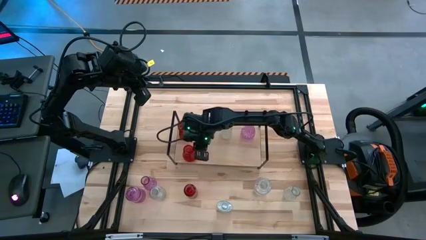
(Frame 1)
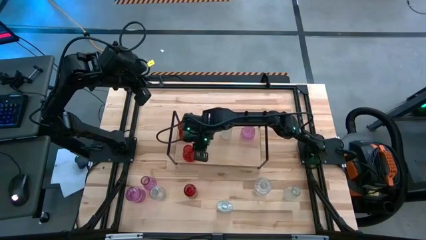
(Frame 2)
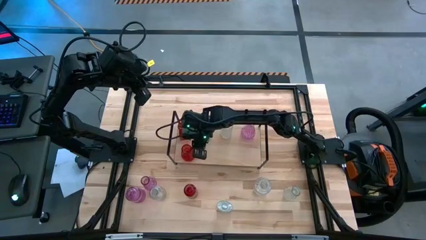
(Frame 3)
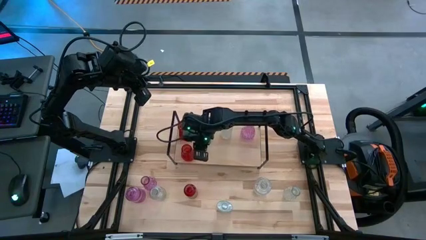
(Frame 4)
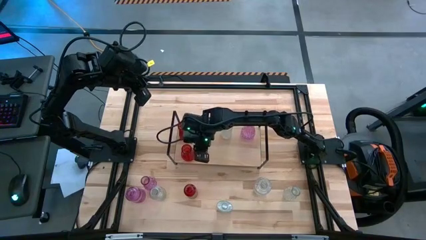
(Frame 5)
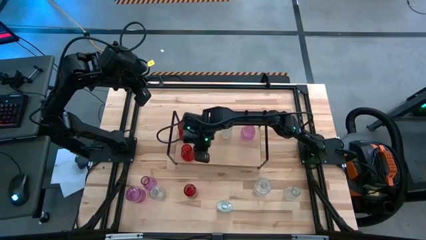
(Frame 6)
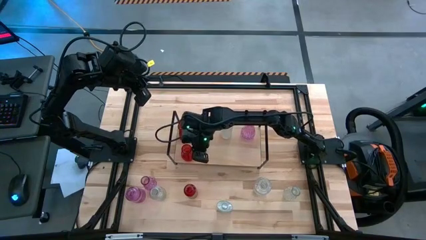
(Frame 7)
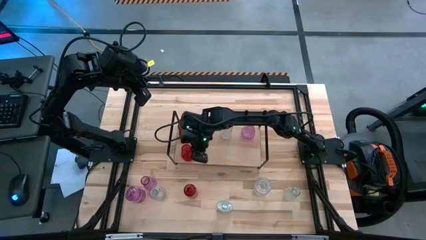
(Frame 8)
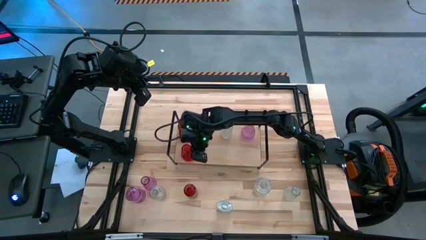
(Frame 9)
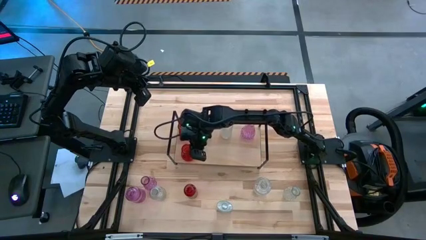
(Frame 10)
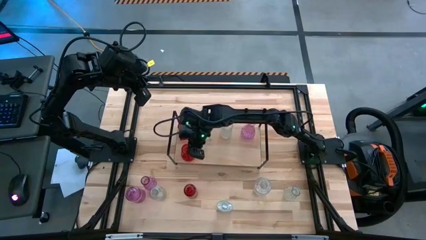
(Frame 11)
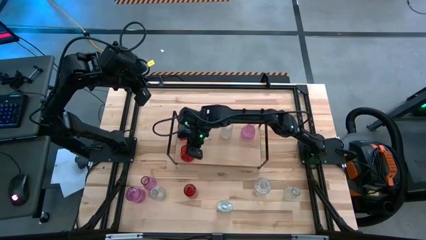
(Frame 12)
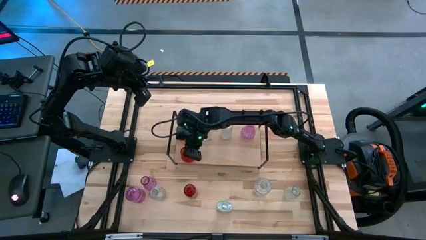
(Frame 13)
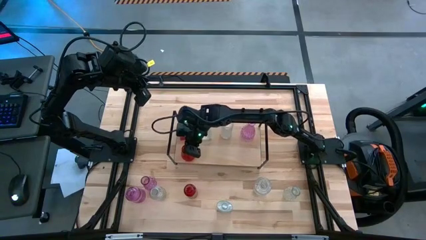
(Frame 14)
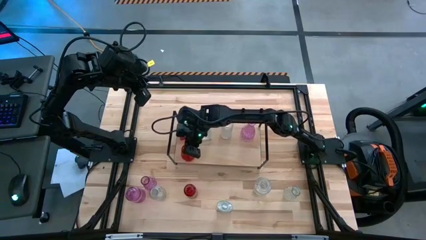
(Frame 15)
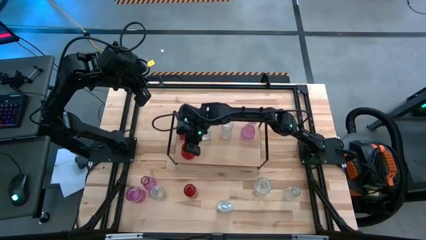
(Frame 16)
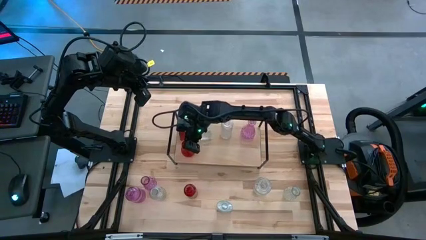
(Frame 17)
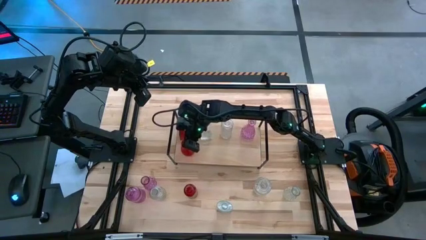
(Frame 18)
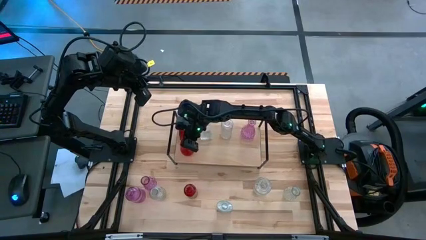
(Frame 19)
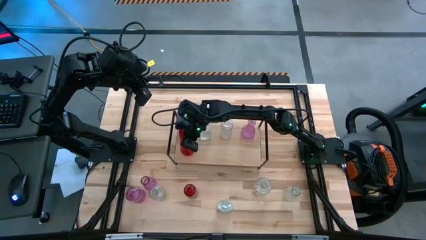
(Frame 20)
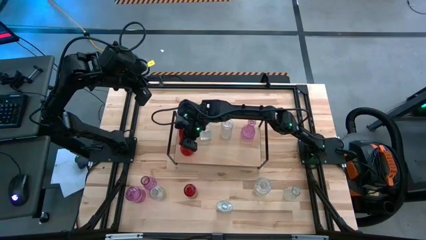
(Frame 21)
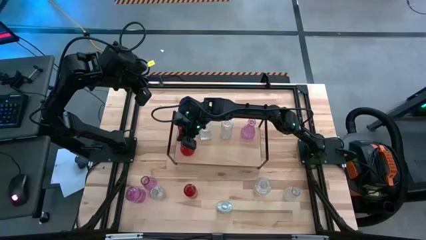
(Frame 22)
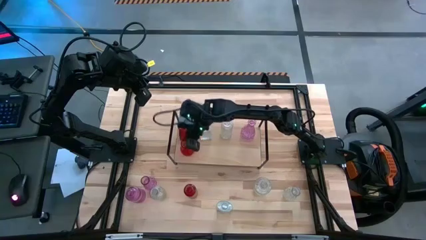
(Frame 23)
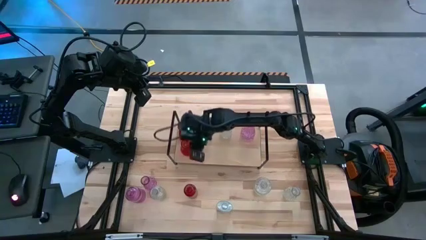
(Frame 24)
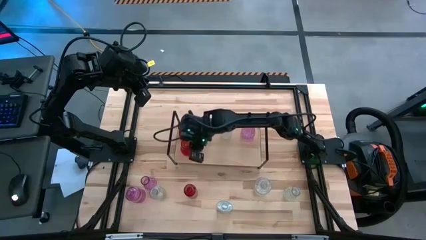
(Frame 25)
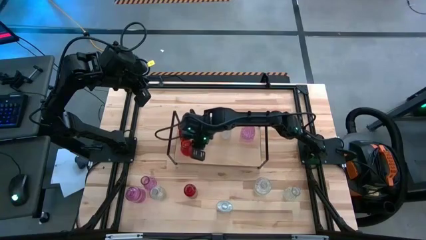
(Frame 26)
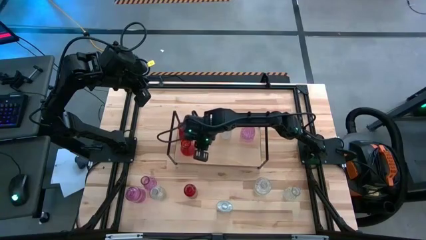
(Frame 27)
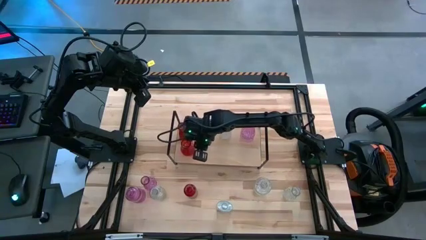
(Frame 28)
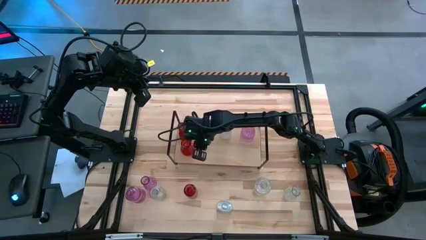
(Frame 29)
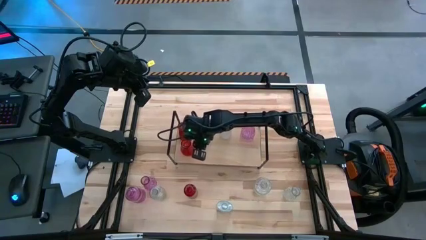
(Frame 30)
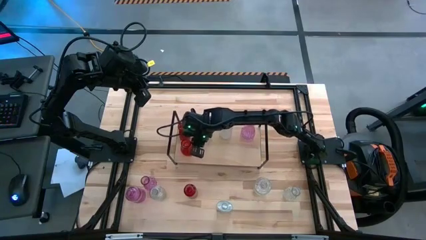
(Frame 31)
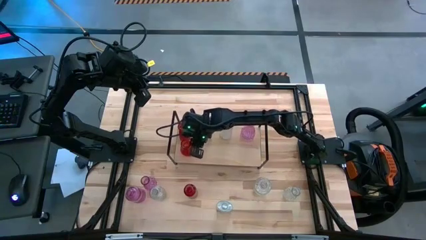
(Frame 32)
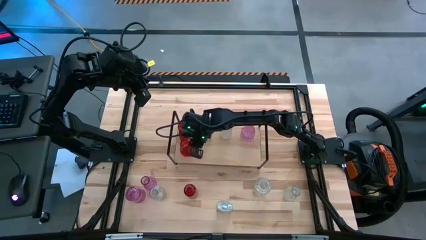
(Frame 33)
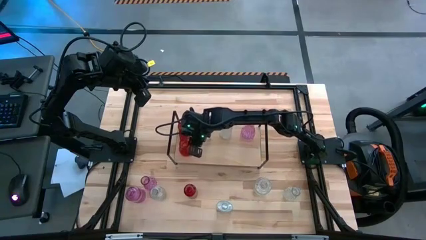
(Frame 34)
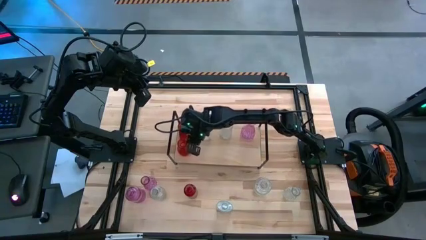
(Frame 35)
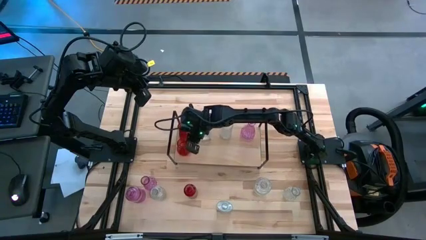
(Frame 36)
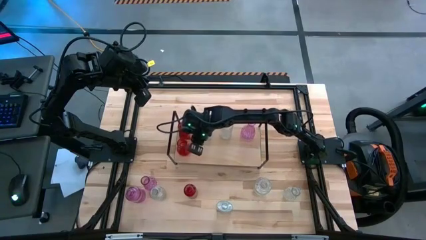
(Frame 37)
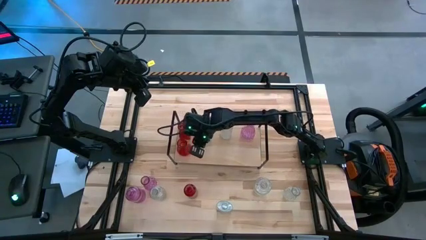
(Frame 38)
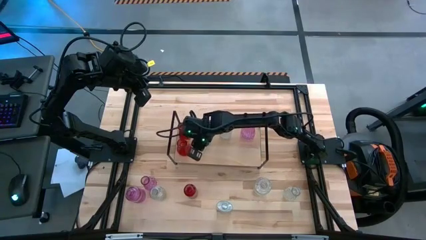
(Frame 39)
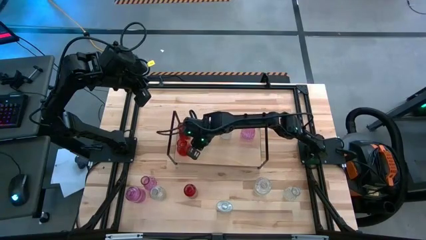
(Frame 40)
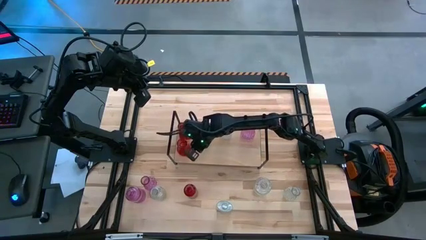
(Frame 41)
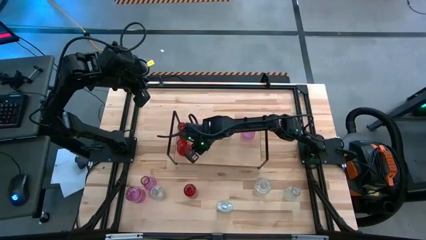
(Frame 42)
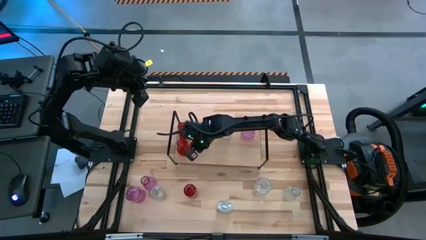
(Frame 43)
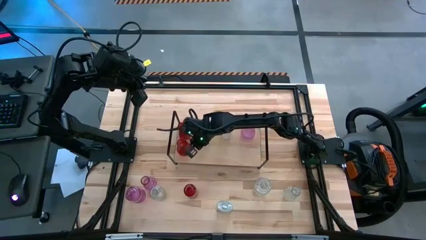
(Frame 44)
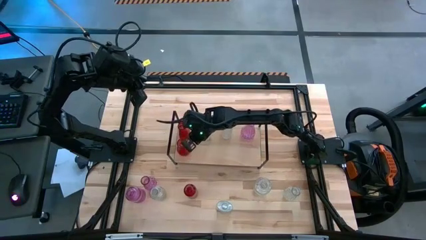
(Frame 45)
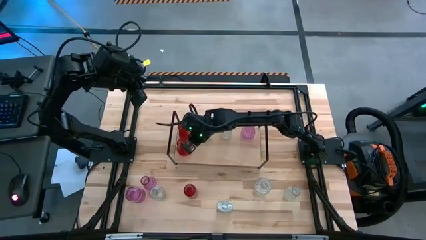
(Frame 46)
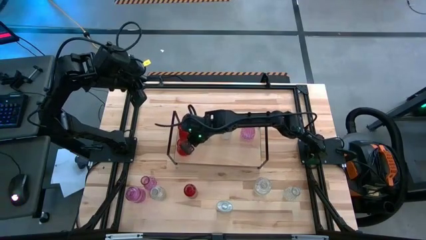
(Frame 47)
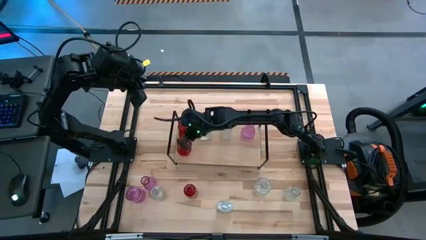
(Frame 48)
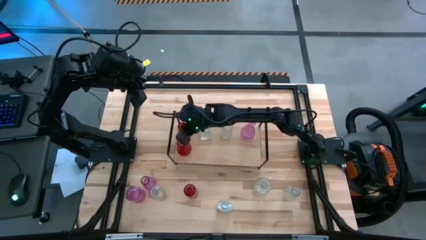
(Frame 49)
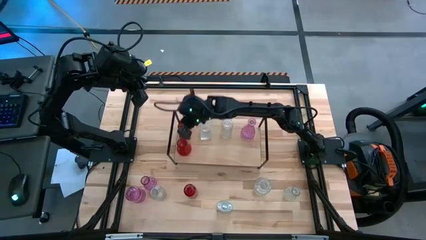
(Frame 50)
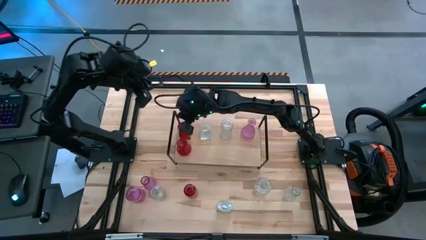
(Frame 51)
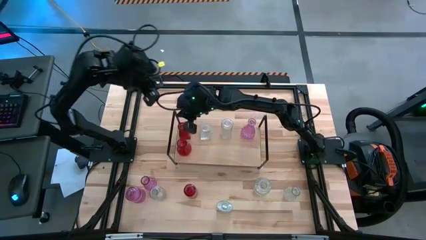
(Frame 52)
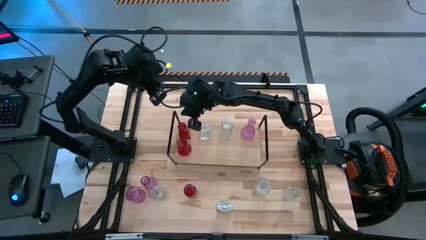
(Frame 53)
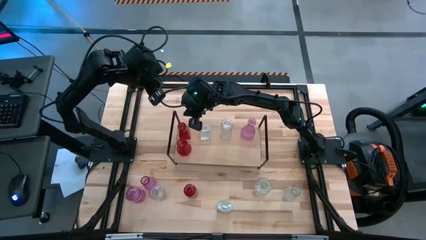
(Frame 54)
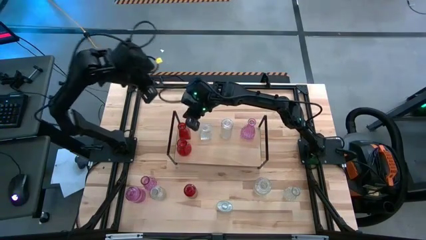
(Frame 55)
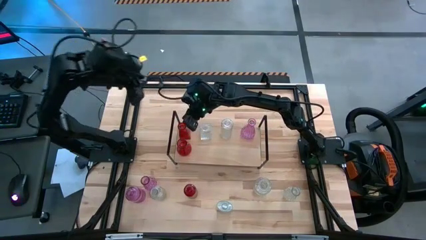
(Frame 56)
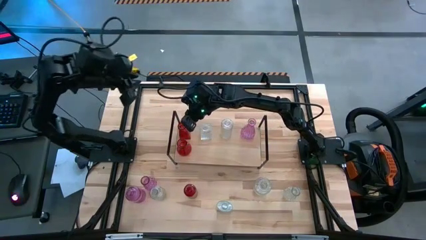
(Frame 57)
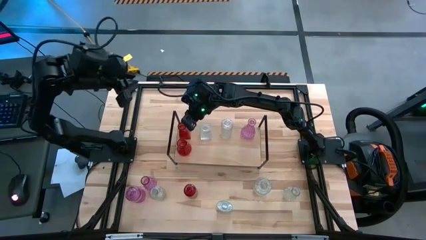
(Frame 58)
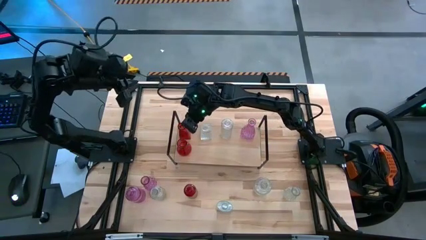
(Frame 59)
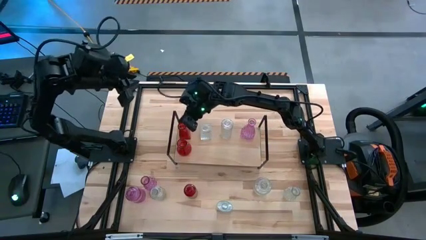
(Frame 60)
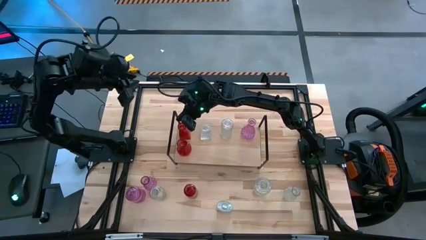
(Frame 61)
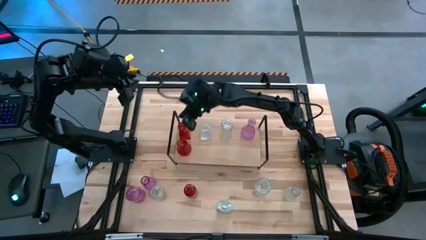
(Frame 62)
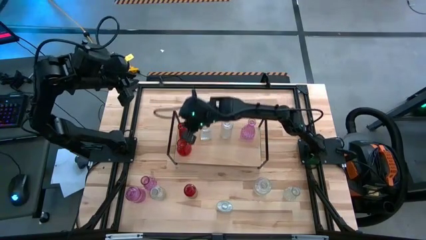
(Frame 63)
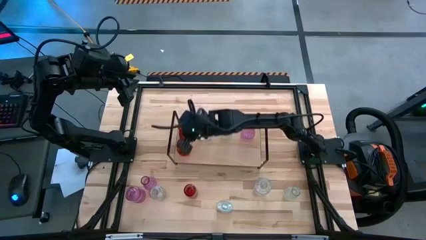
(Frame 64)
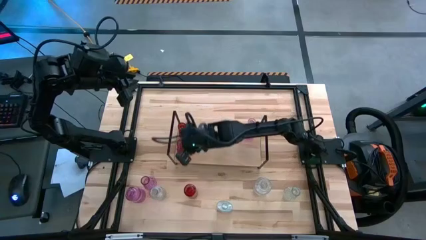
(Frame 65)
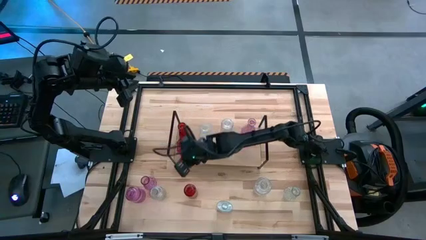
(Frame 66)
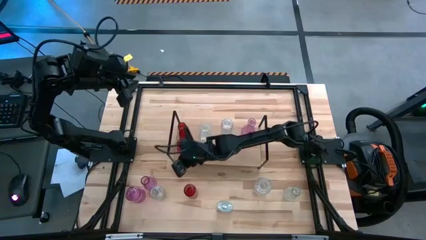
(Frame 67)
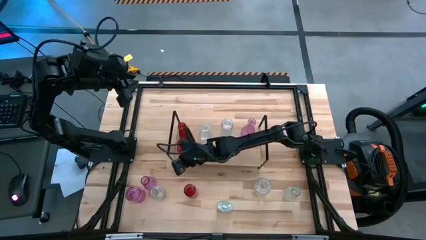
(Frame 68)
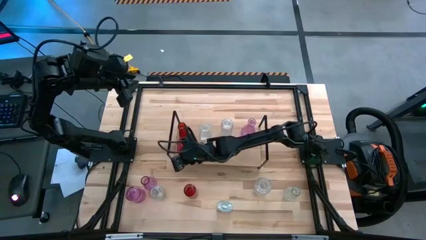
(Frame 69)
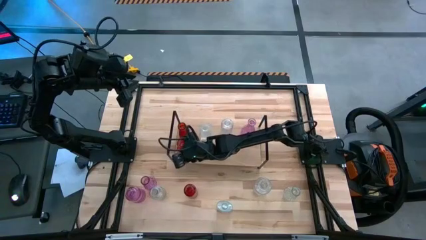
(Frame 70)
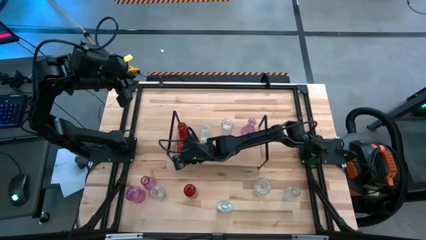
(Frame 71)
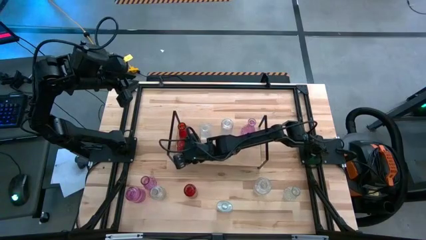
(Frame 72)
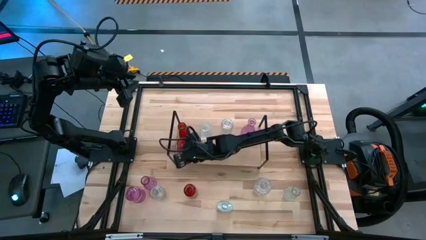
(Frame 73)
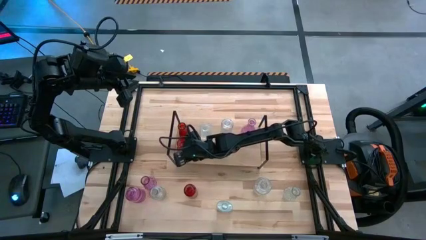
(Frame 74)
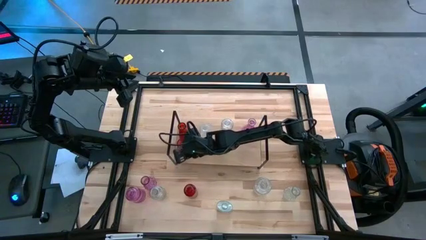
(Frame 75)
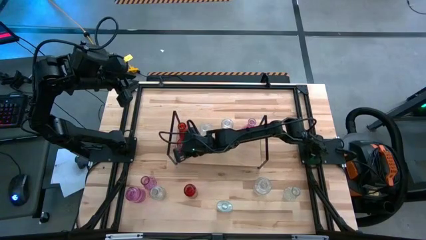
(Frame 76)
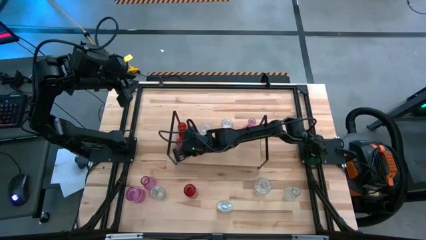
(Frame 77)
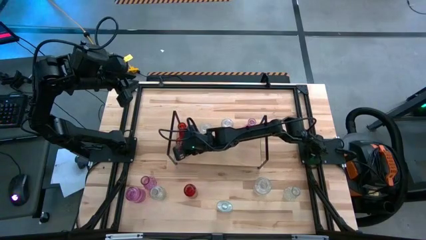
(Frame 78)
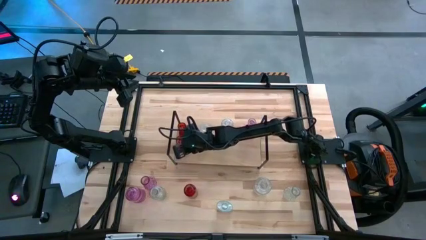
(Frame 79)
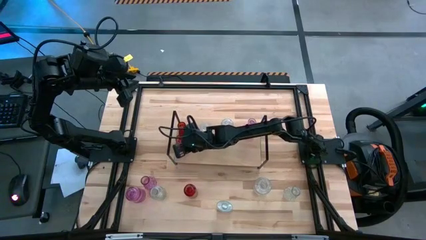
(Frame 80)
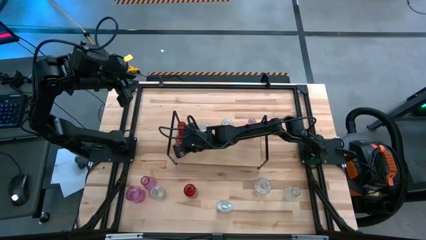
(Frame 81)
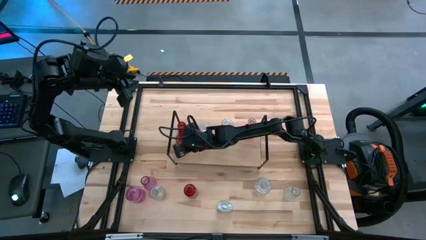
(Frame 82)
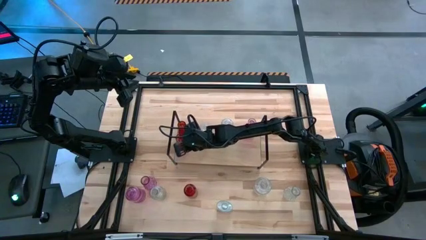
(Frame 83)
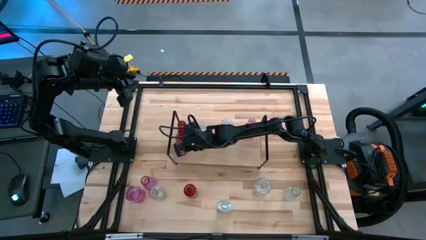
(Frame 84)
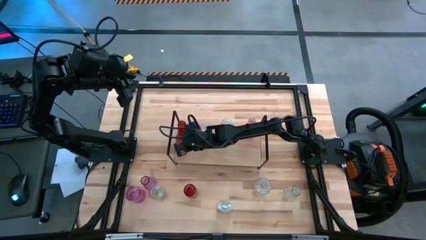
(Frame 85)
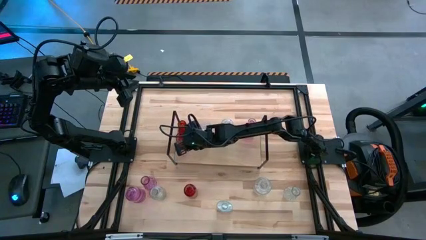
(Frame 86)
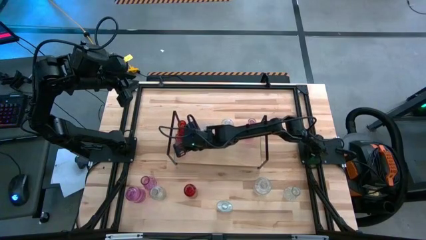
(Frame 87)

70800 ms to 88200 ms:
Task: sort vases onto shelf
Put the red vase aligned with the other red vase on the shelf
